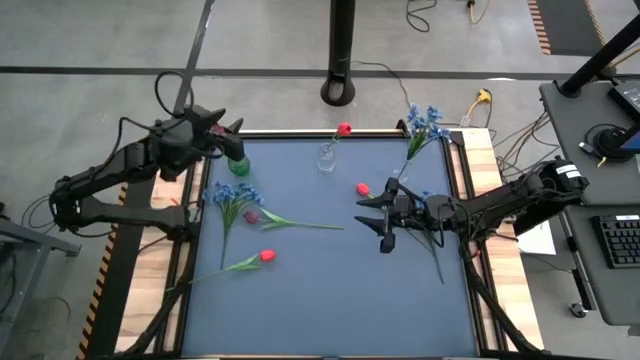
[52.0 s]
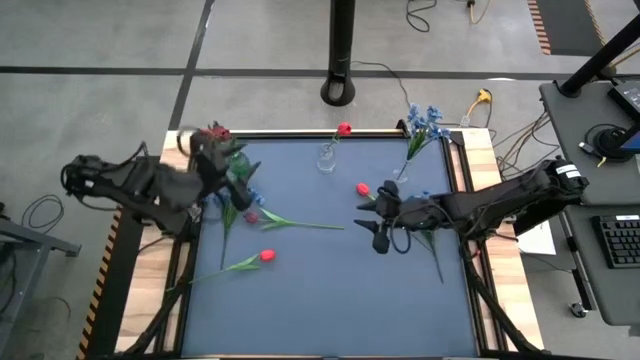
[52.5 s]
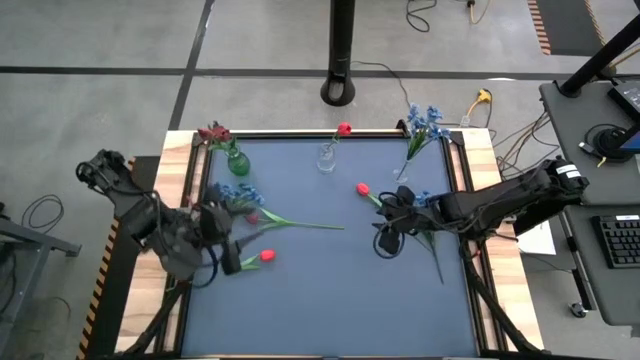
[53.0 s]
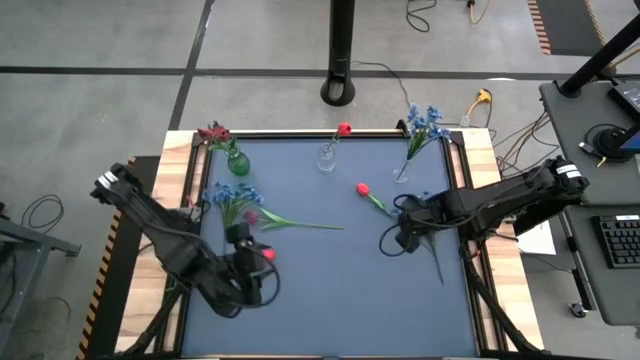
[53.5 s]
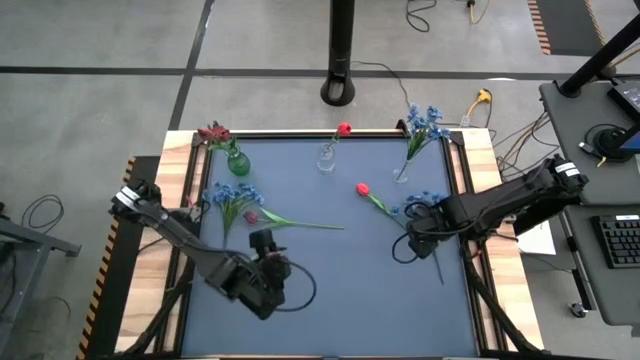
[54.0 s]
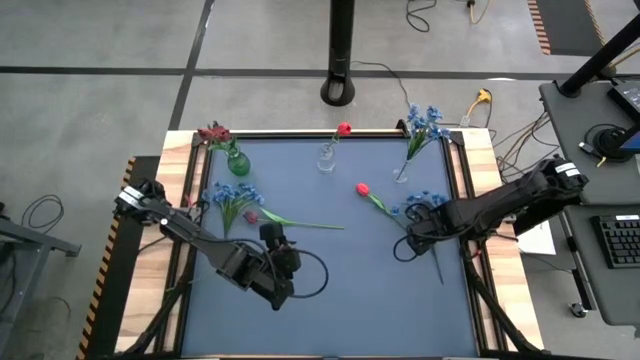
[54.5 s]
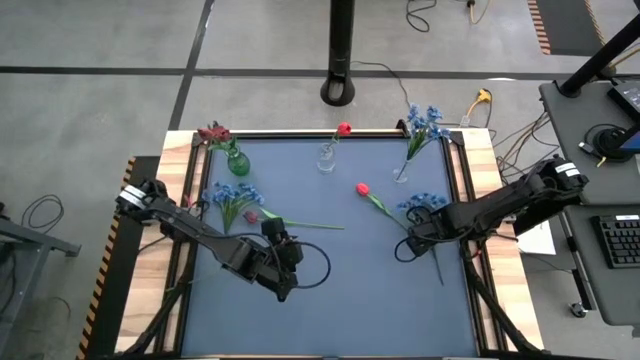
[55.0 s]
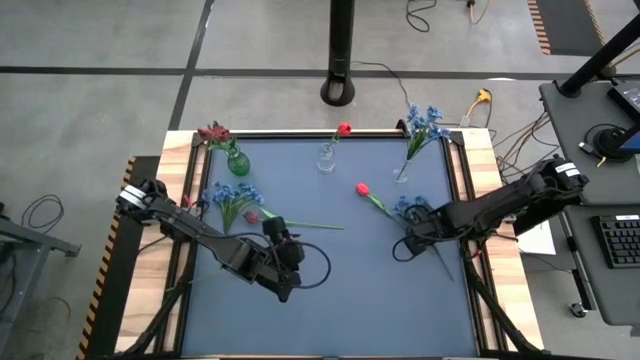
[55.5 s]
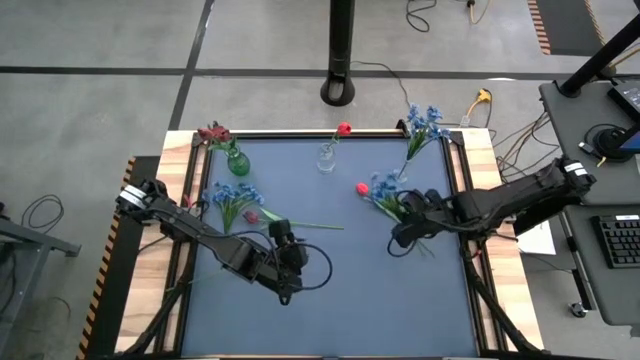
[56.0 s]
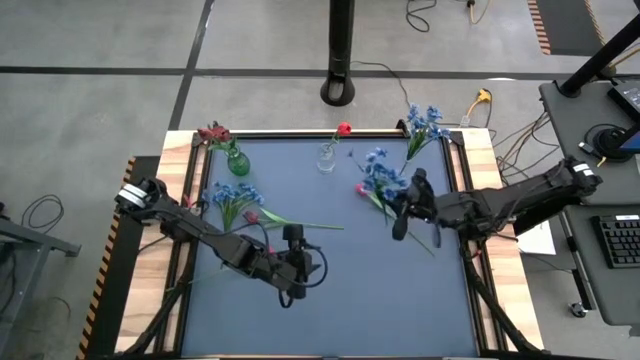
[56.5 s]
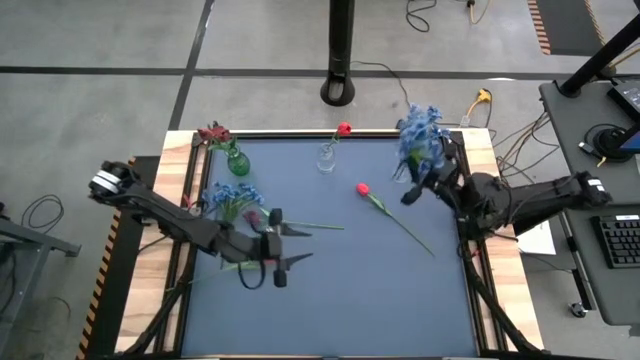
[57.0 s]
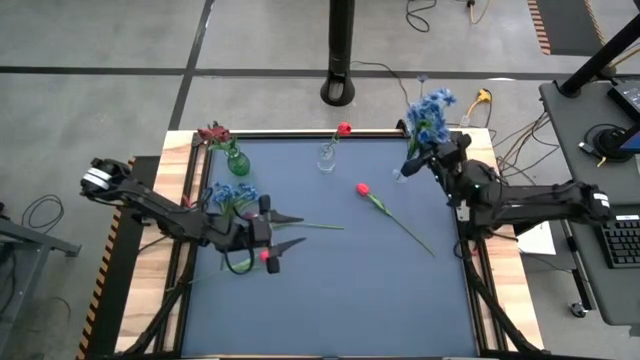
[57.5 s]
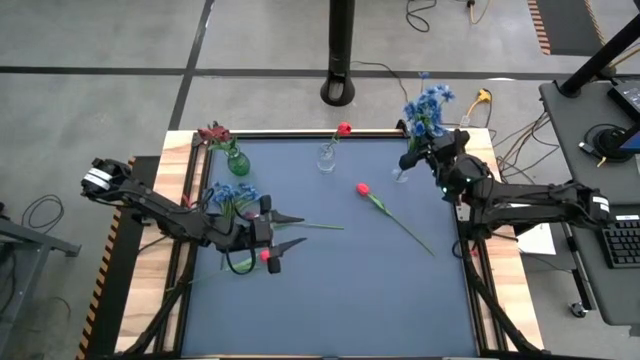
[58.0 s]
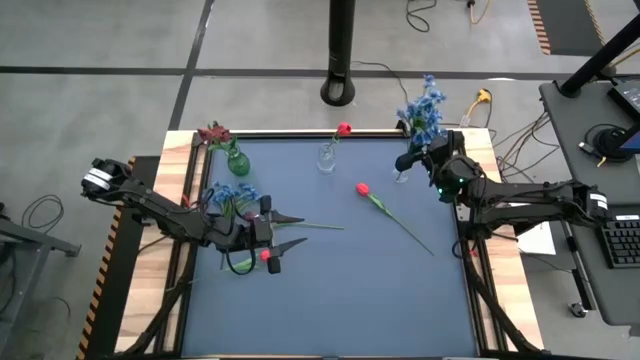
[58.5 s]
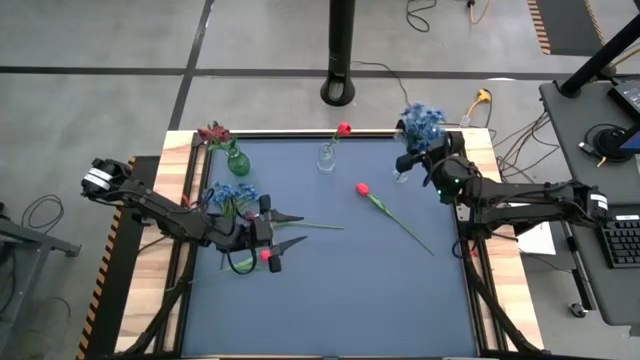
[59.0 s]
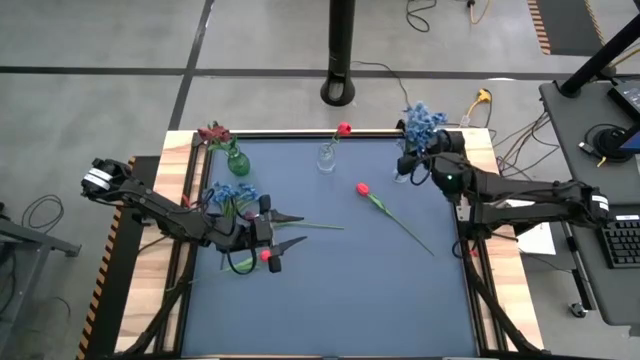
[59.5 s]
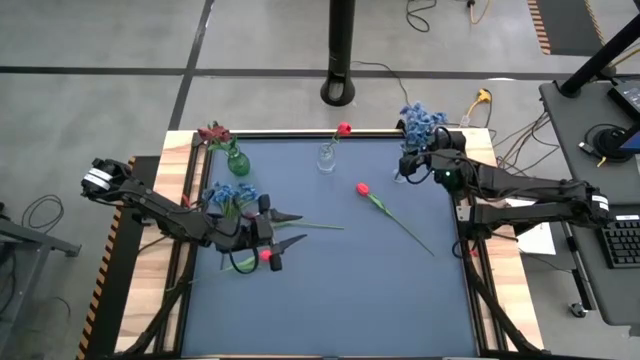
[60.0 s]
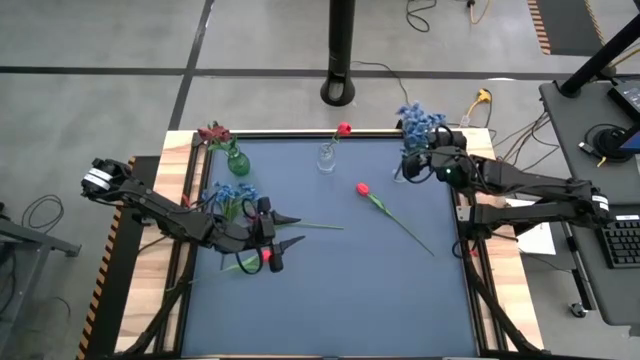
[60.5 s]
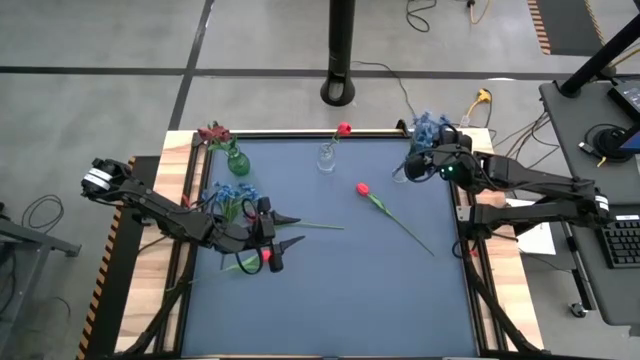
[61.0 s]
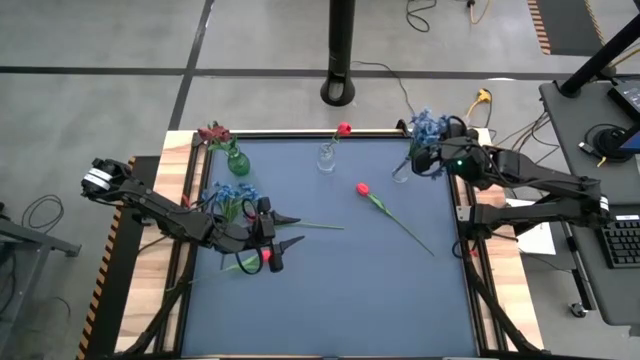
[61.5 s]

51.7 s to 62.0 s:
Task: Sort flowers into vase by color
Put the right blue flowers into the right transparent vase

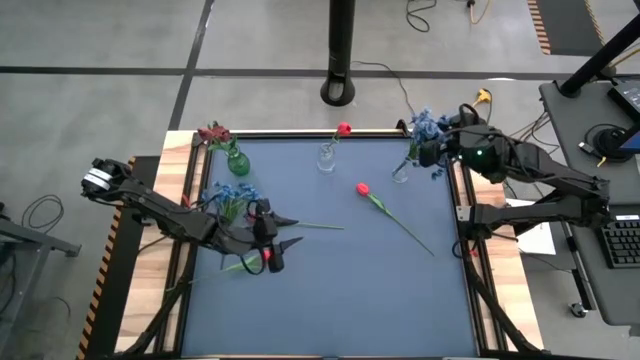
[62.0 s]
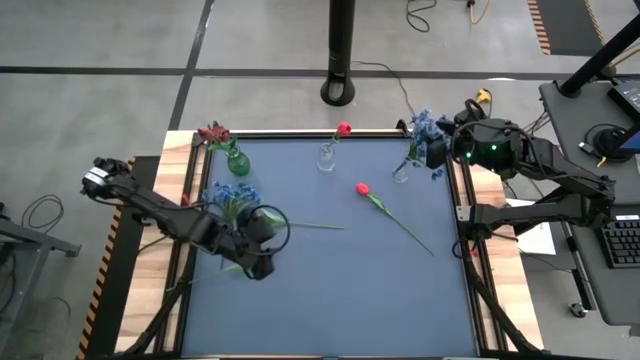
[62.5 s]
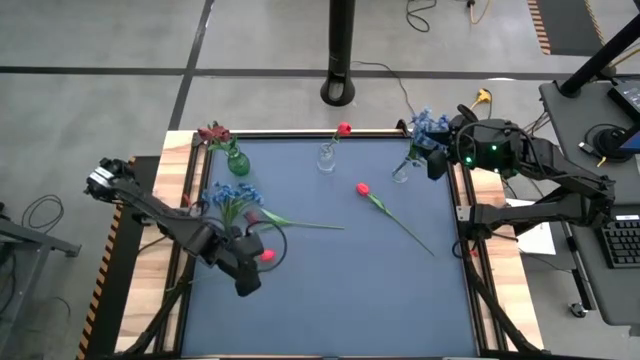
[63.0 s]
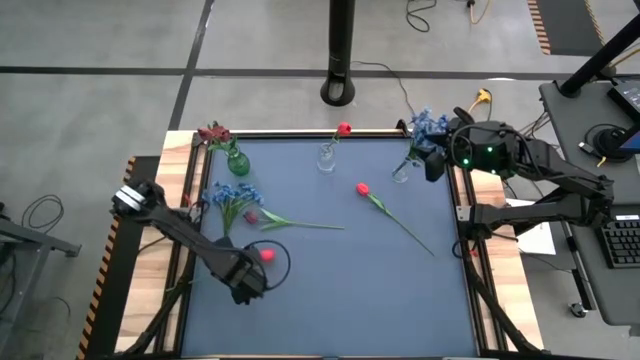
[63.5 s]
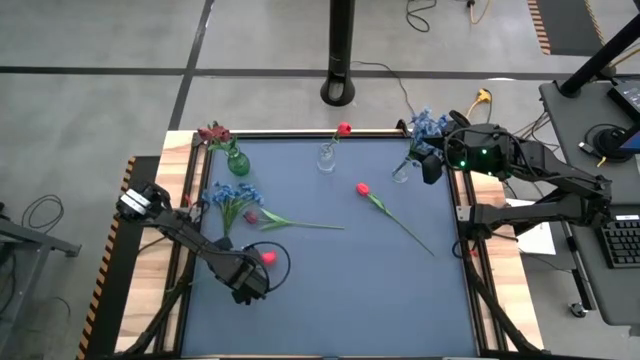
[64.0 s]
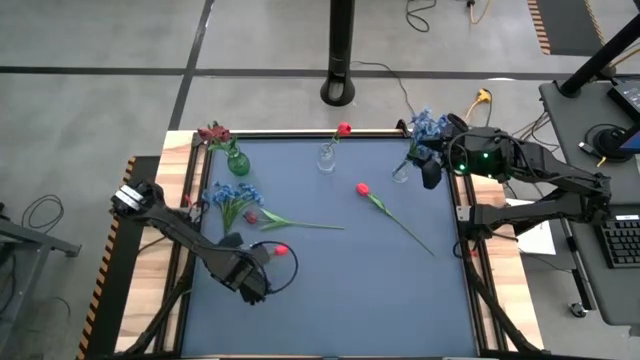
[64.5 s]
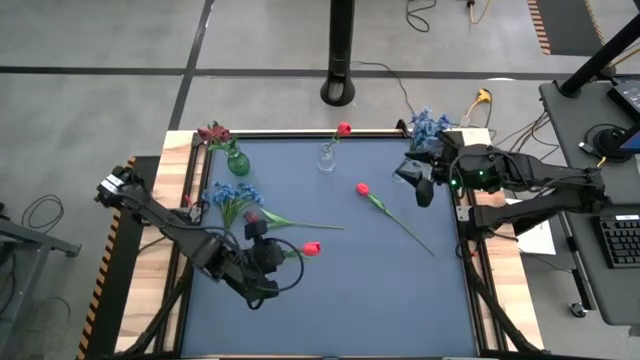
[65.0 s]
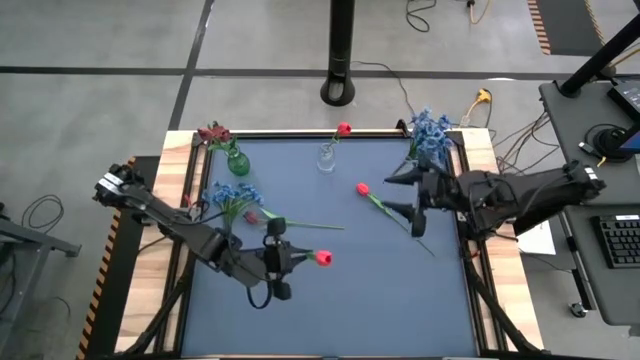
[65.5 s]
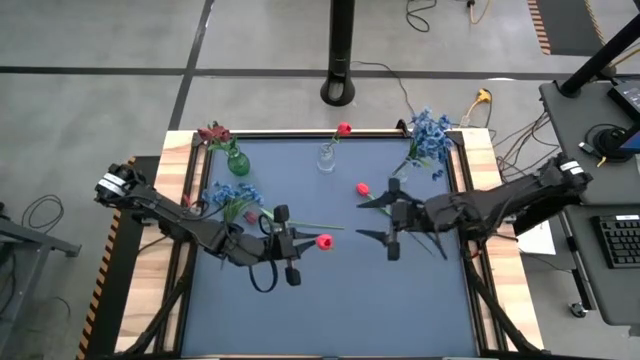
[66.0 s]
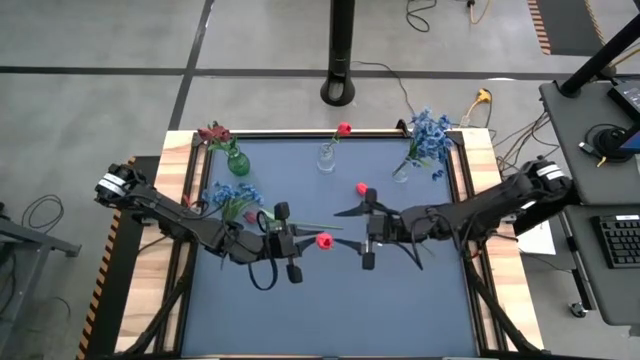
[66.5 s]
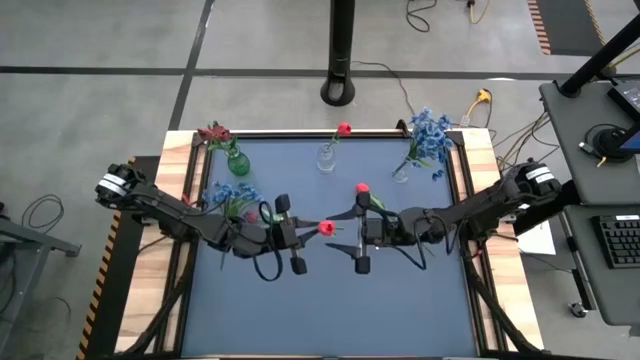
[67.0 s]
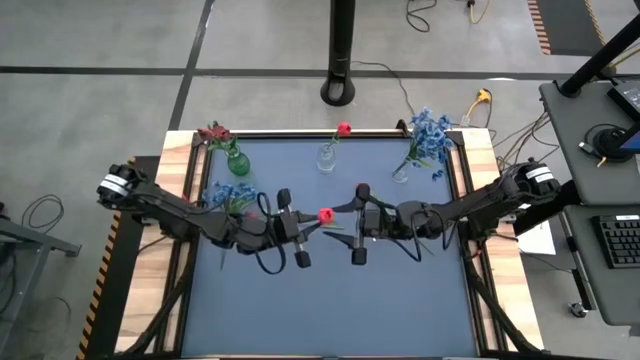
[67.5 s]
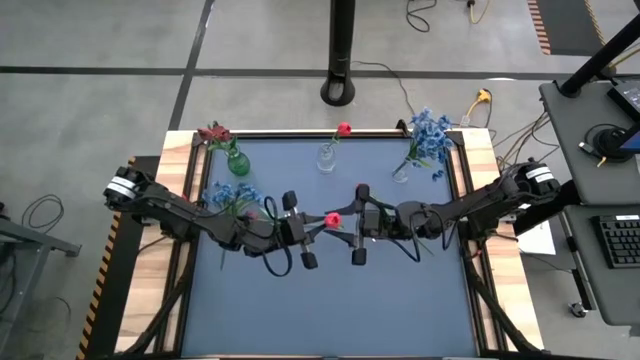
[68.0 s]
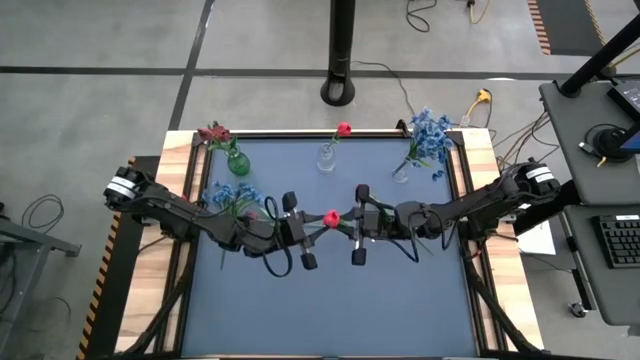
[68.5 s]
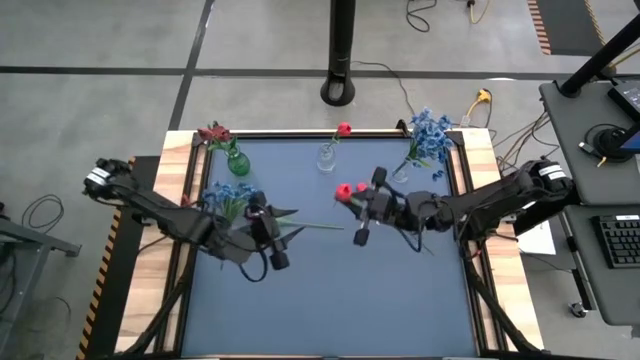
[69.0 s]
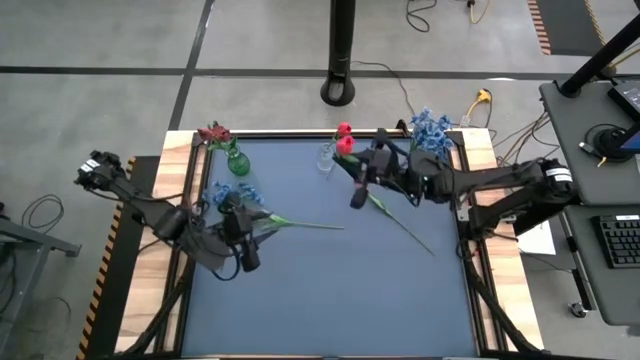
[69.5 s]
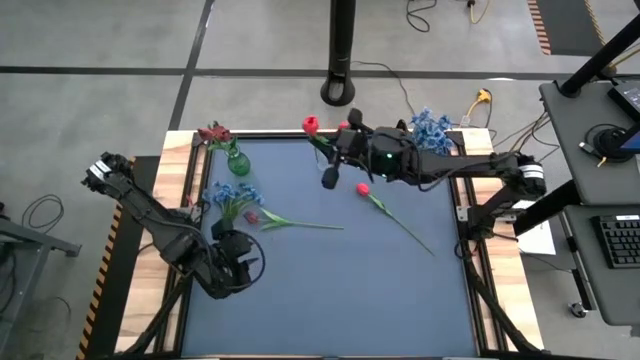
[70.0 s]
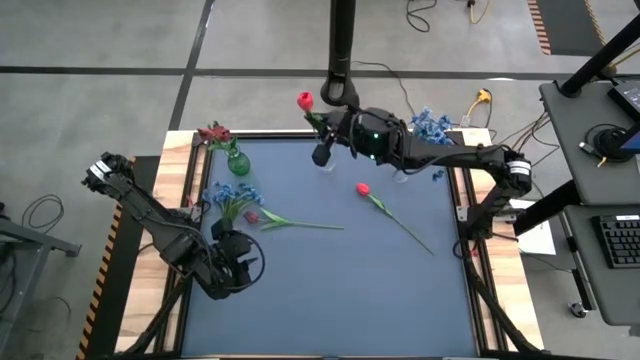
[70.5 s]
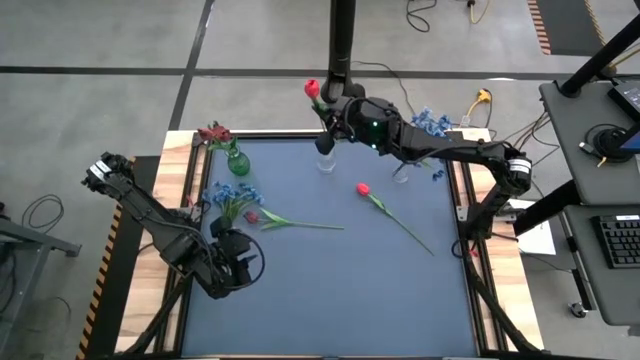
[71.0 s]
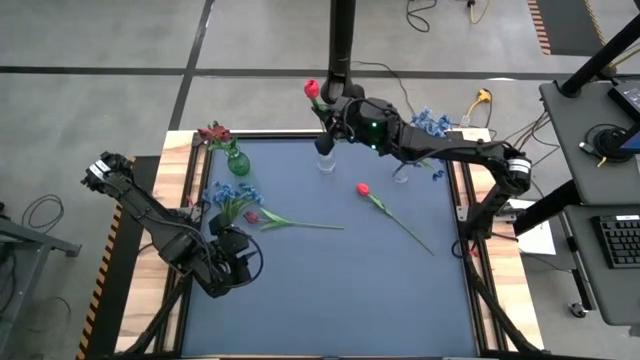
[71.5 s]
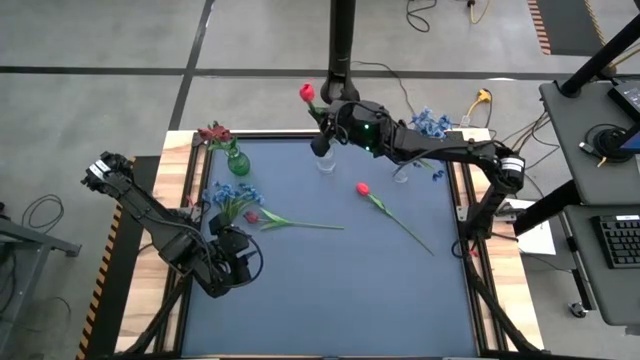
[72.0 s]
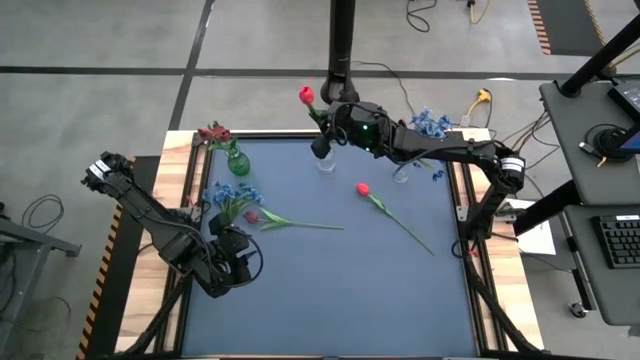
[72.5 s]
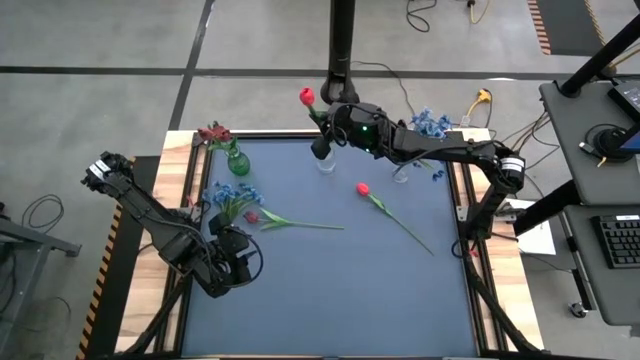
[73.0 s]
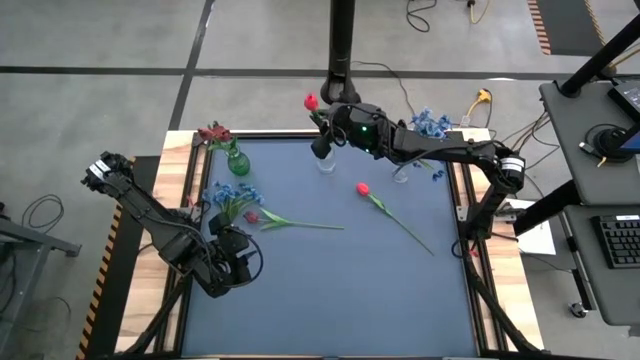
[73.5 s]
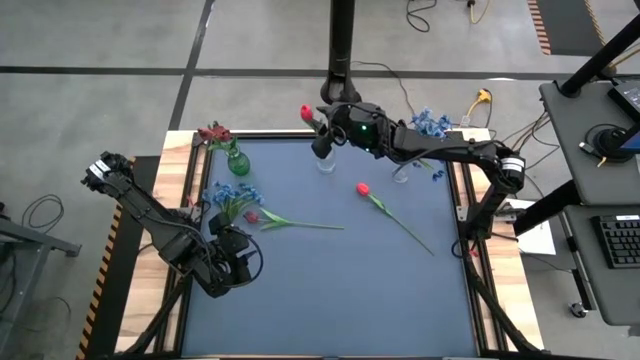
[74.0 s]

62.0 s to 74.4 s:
Put the left red flower into the left transparent vase
